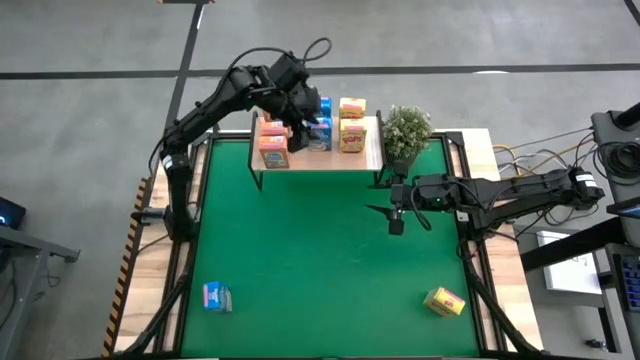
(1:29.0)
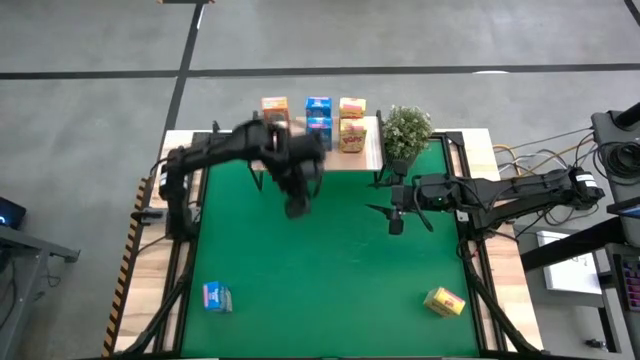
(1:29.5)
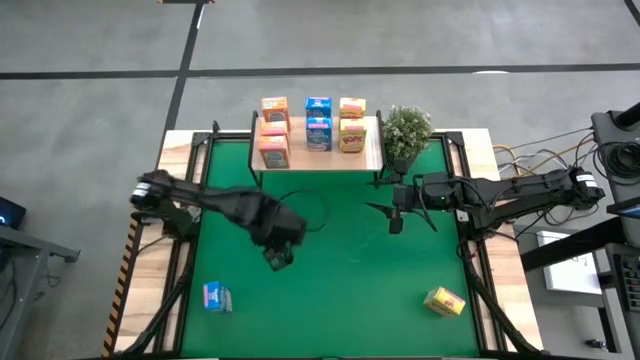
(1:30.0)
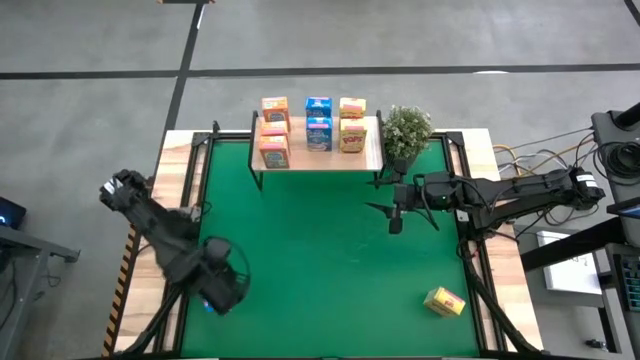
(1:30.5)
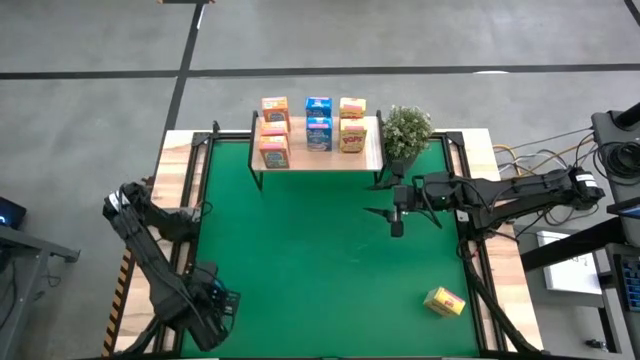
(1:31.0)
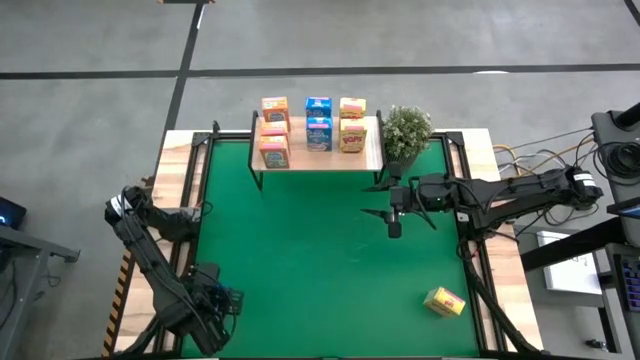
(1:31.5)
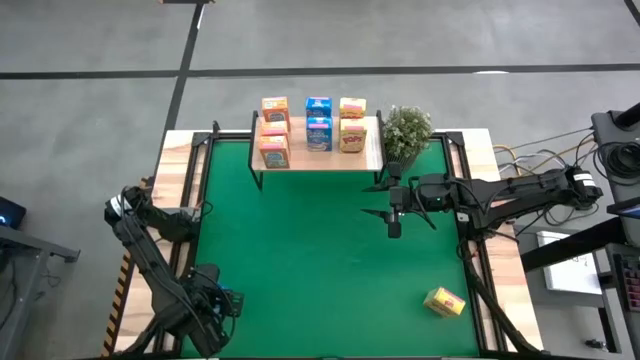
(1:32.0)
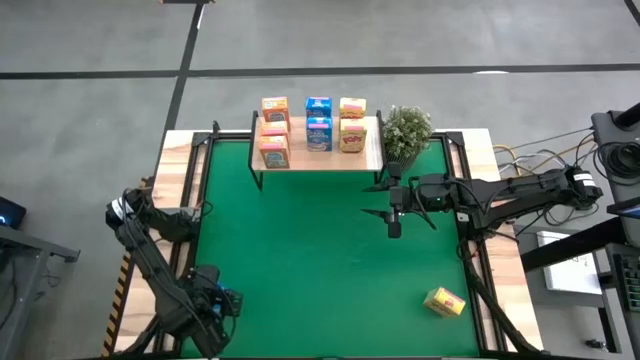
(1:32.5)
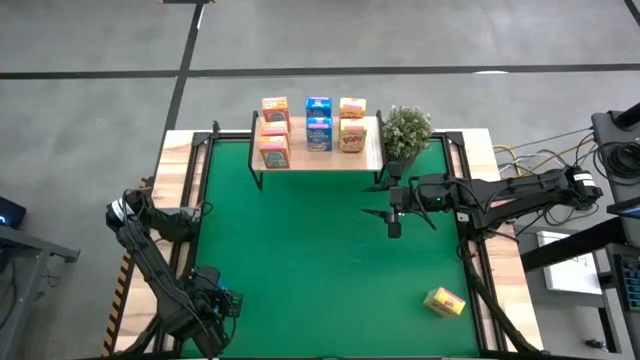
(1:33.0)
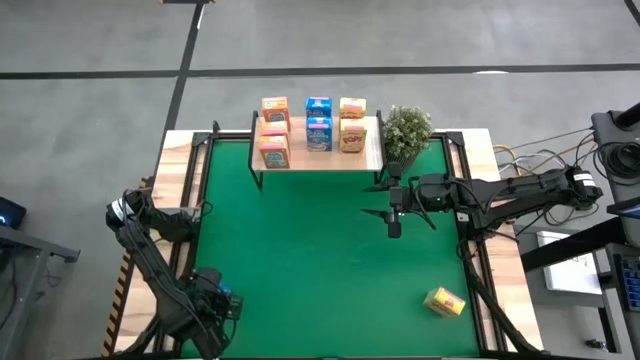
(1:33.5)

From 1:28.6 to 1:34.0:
Task: Stack cereal on shelf
Put the blue cereal box on the shelf

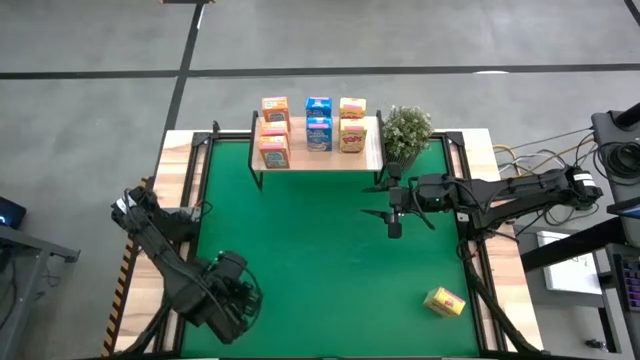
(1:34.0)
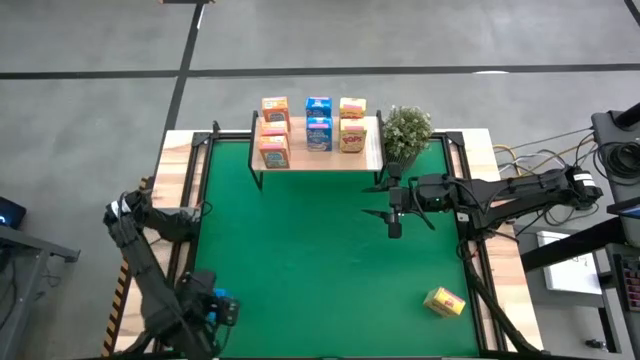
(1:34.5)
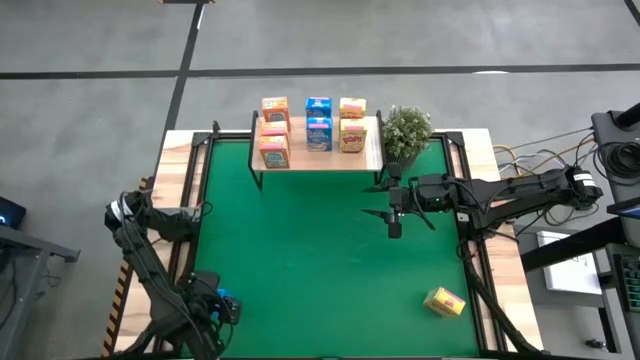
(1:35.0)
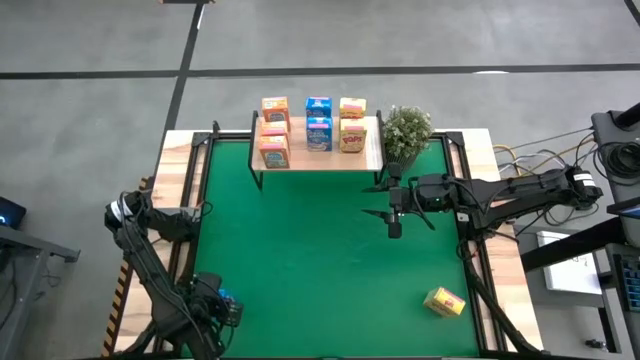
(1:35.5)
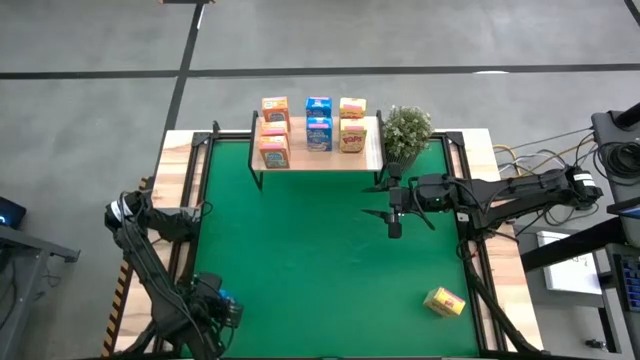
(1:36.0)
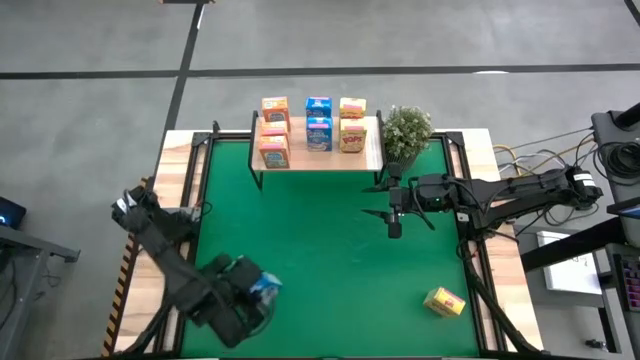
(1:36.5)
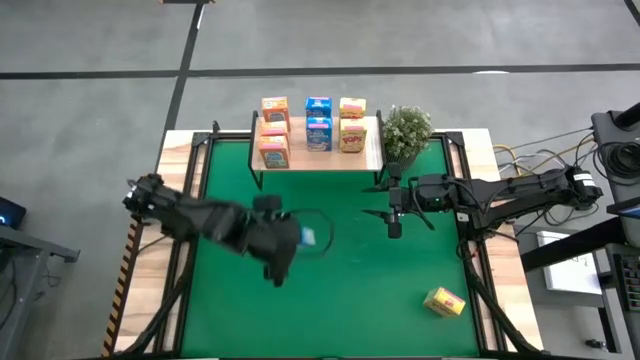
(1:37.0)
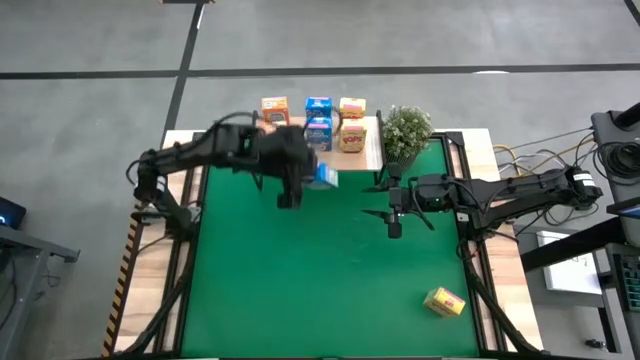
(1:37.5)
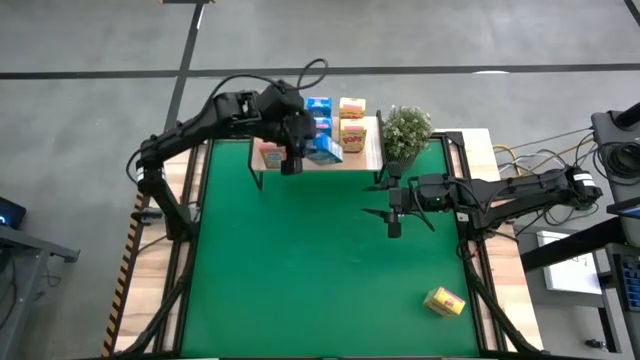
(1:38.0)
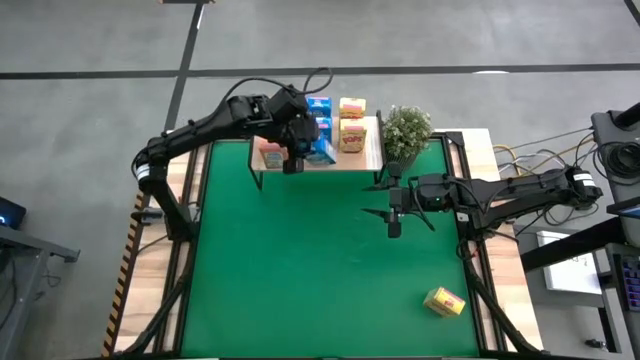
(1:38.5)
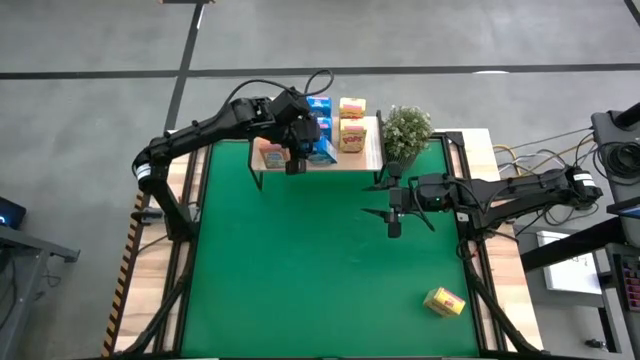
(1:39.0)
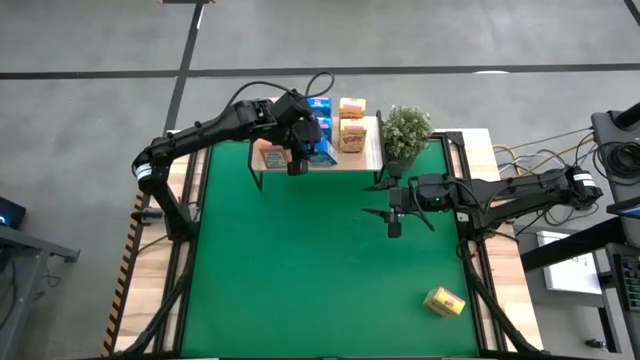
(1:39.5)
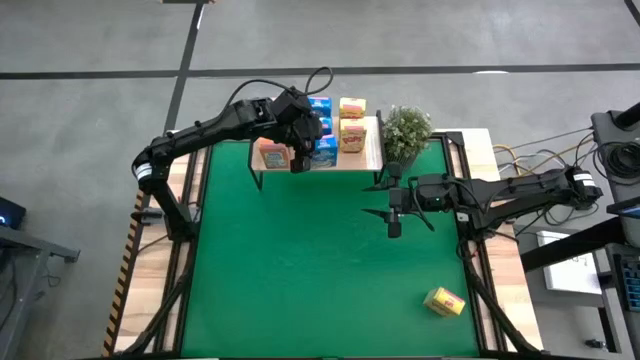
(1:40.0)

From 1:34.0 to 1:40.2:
Put the blue cereal box on the shelf

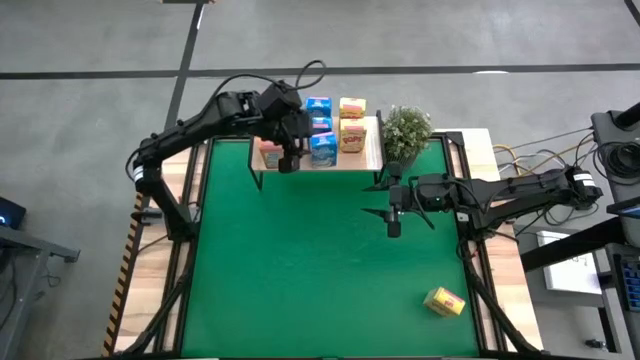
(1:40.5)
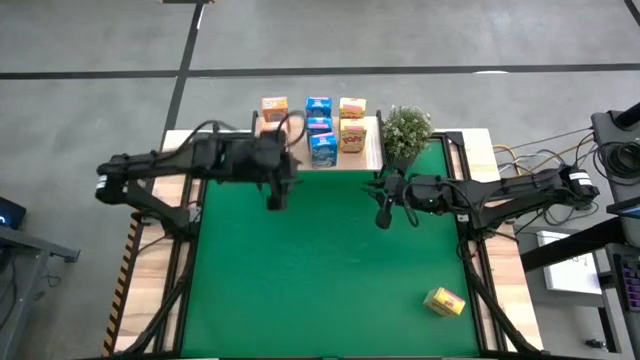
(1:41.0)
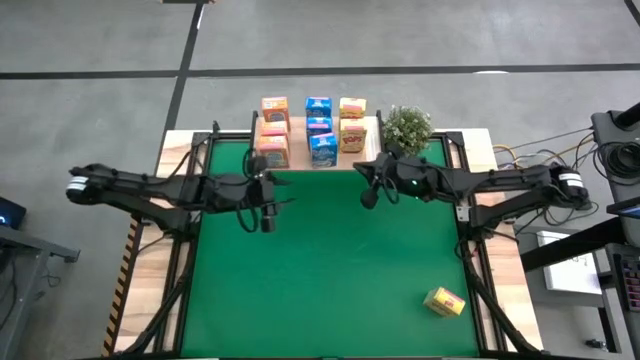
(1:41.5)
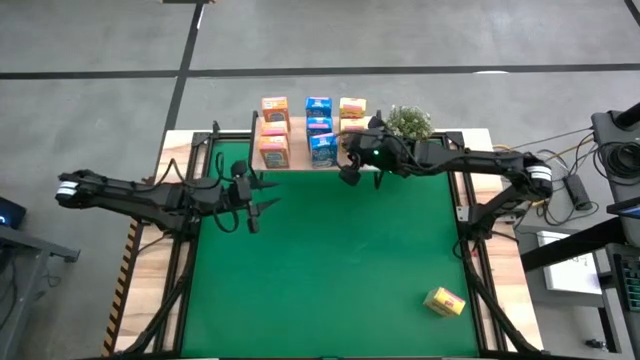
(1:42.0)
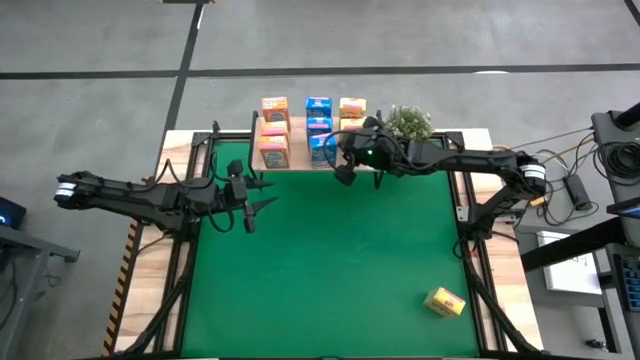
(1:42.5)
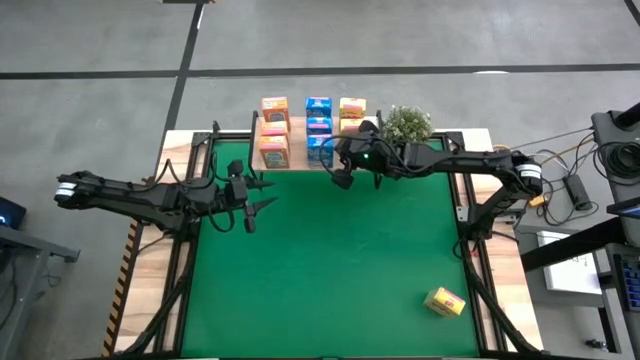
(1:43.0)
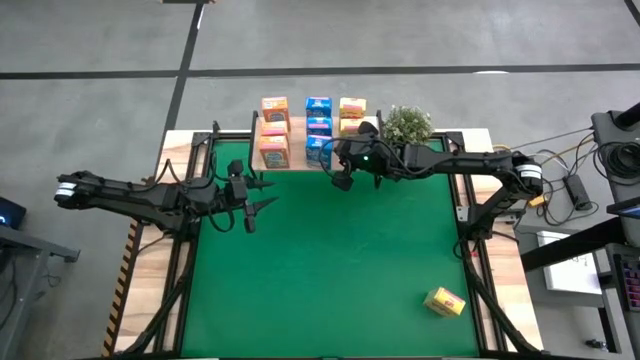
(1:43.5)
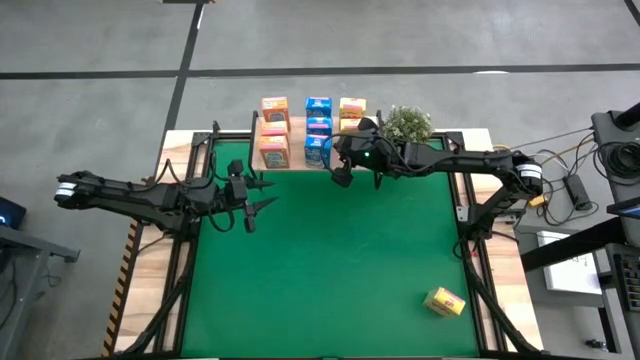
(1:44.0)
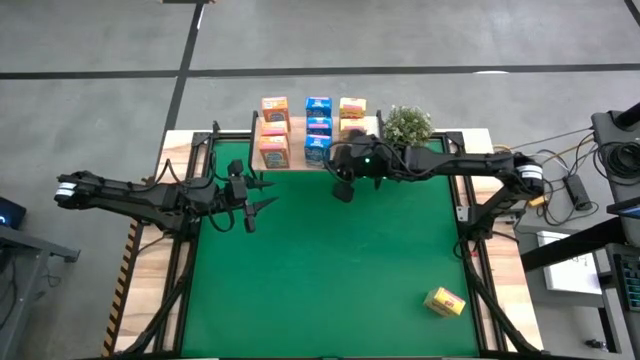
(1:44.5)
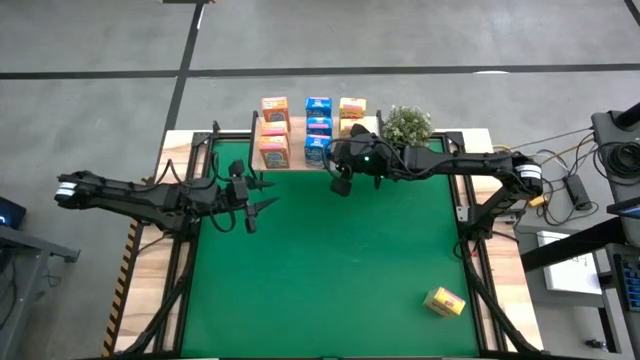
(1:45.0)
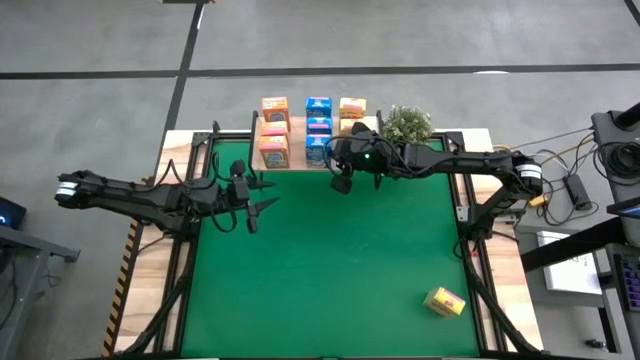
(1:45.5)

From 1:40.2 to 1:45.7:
Adjust the front blue cereal box on the shelf

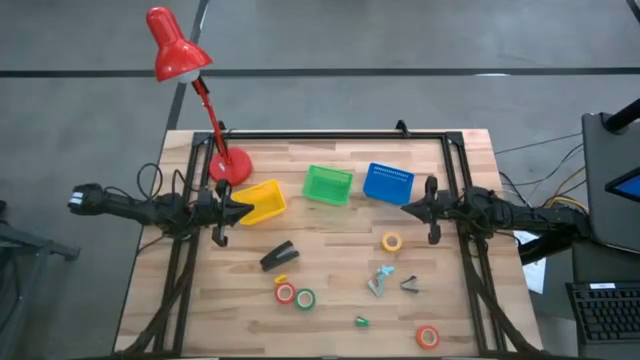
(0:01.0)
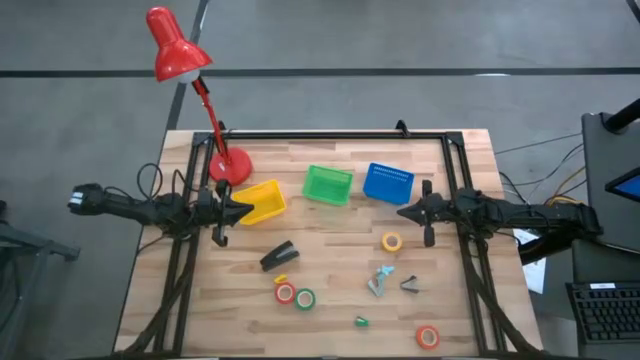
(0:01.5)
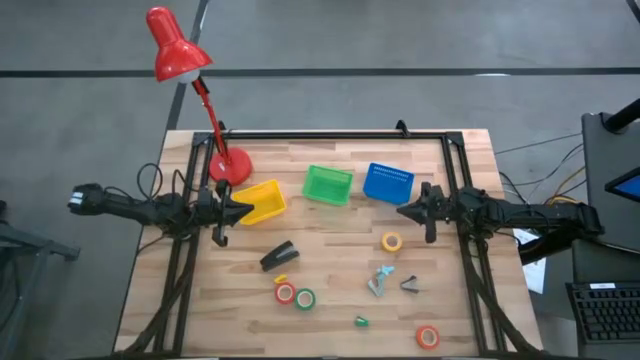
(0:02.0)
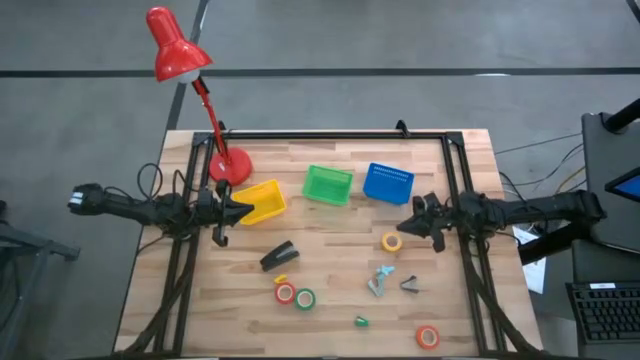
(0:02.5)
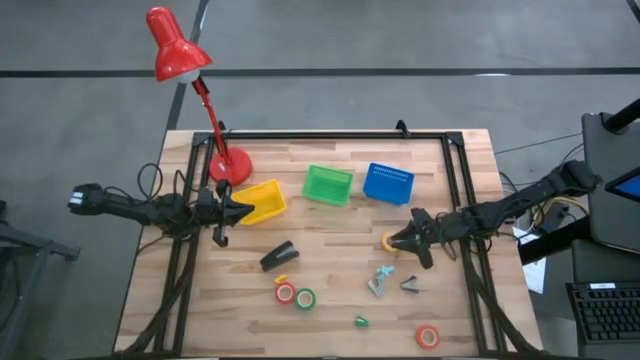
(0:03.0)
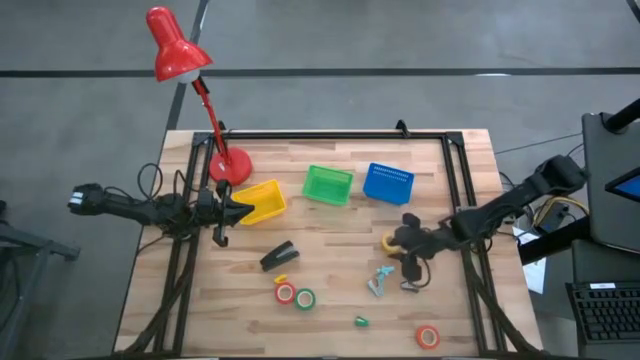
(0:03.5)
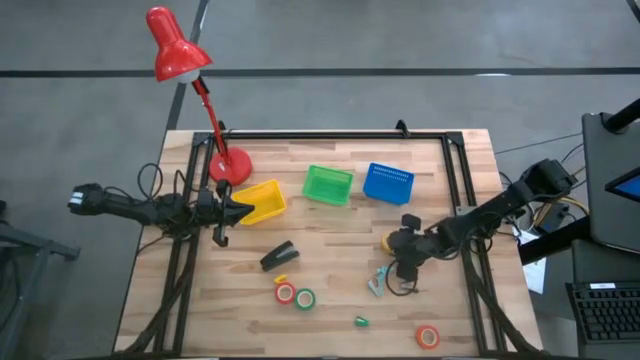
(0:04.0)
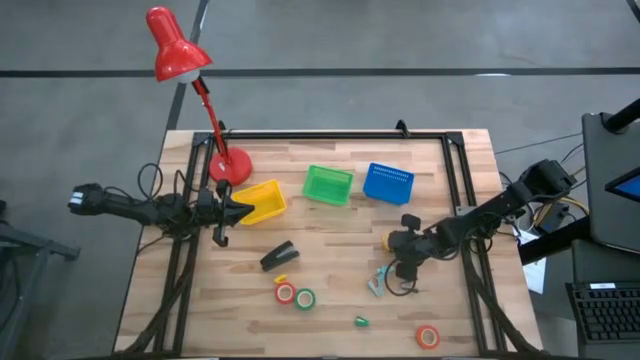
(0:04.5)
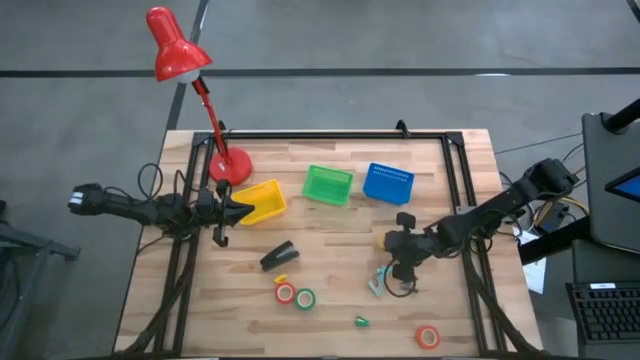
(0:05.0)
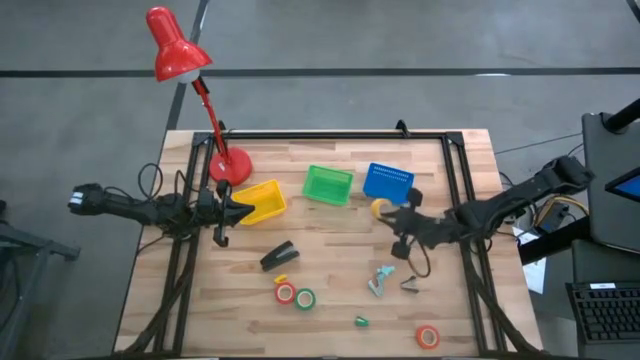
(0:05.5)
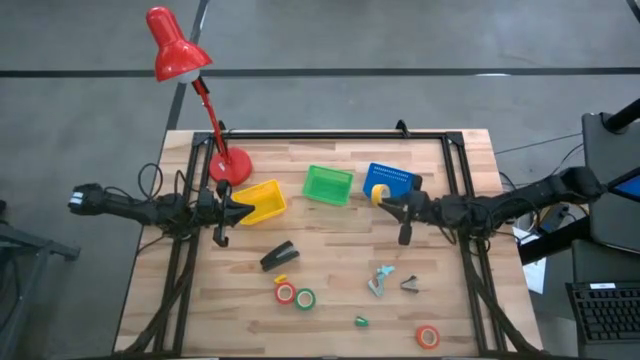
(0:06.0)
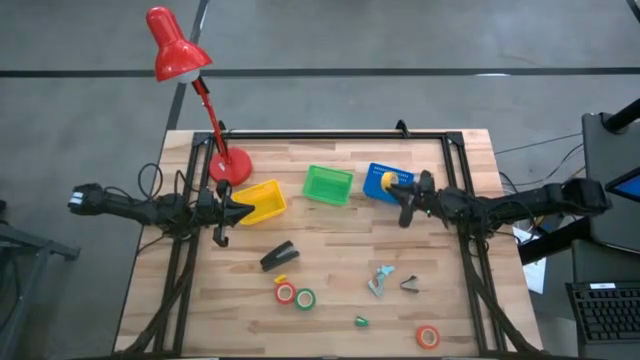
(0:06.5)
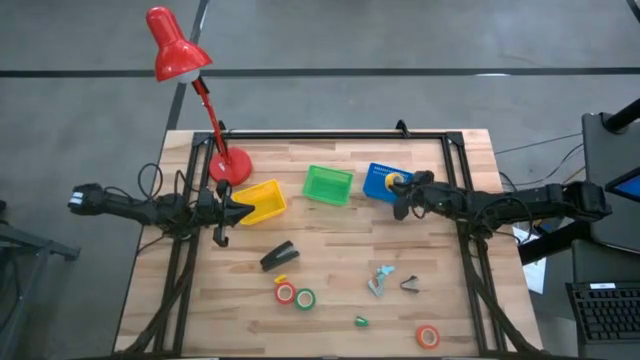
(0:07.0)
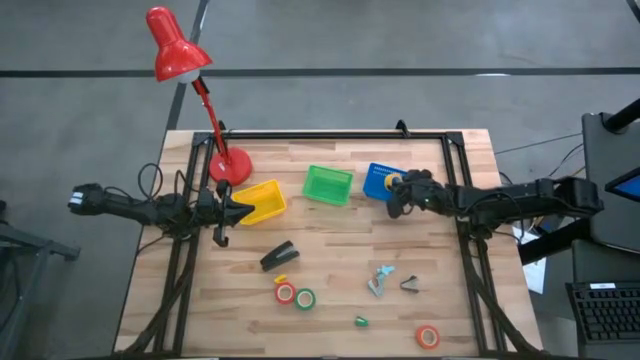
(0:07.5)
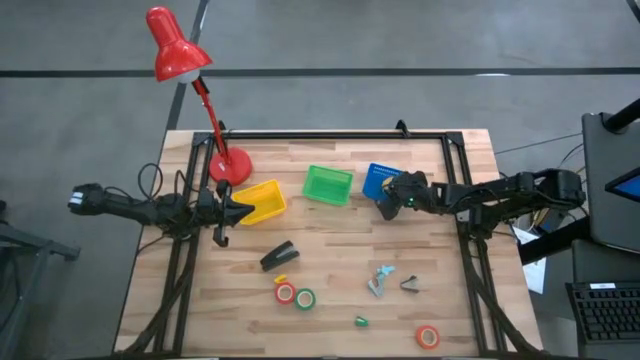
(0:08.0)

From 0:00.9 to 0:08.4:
Task: Pick and place Stapler, Stapler remover, tape
Put the yellow tape in the blue basket
